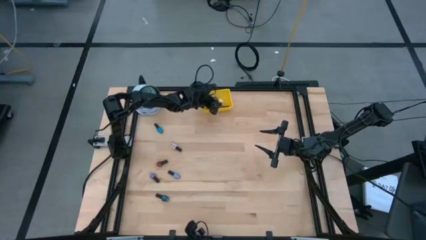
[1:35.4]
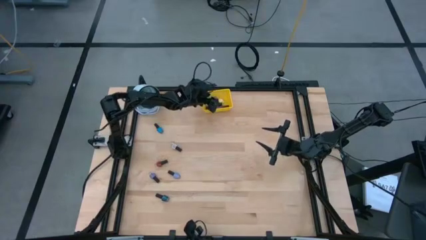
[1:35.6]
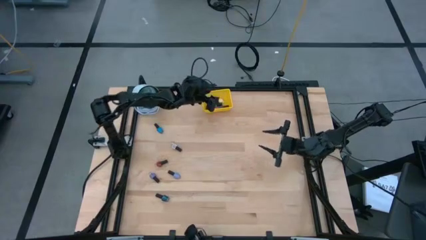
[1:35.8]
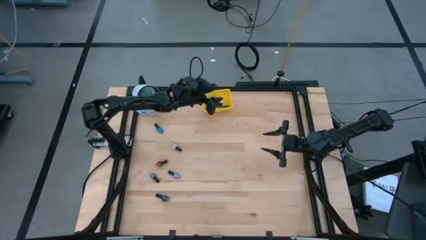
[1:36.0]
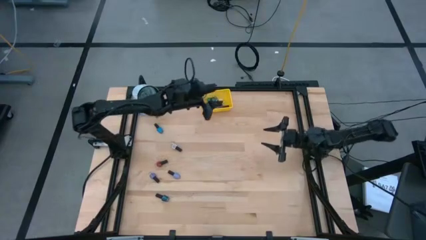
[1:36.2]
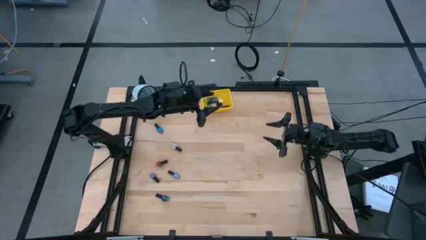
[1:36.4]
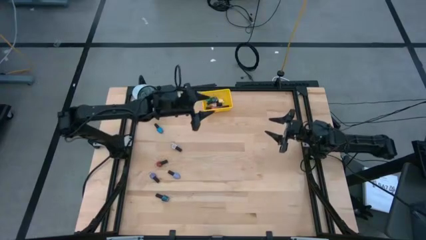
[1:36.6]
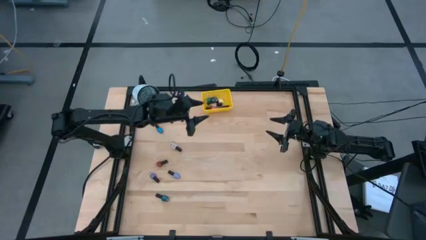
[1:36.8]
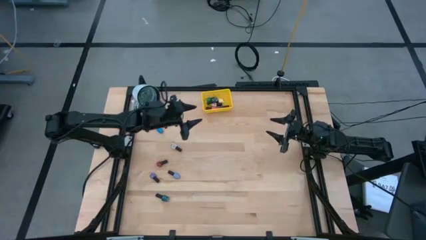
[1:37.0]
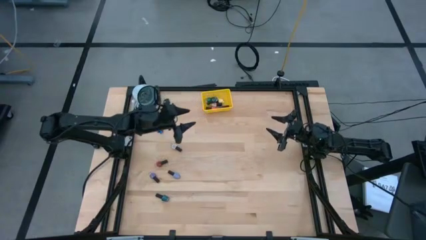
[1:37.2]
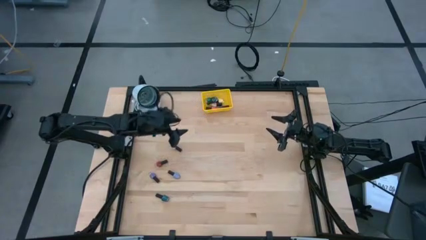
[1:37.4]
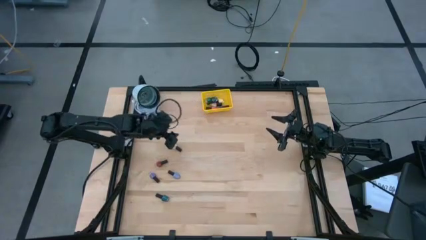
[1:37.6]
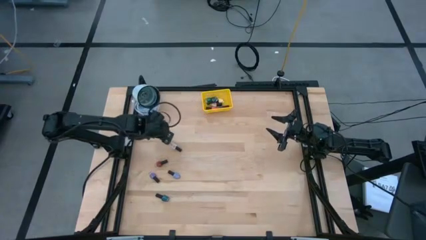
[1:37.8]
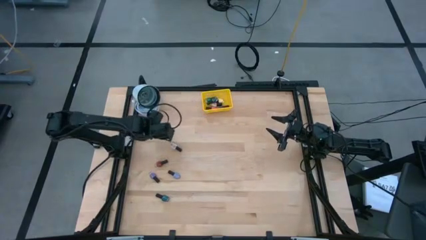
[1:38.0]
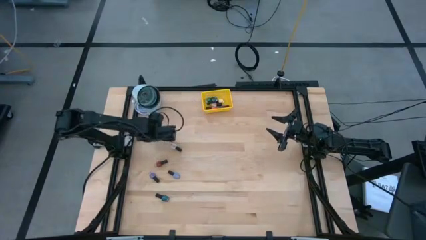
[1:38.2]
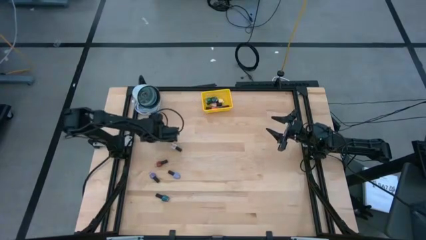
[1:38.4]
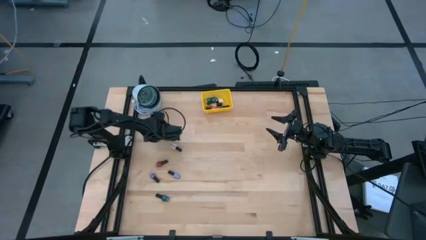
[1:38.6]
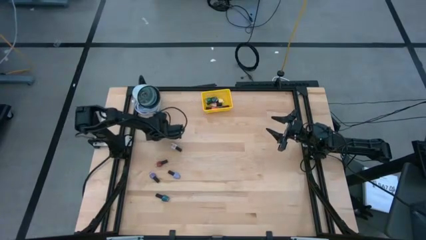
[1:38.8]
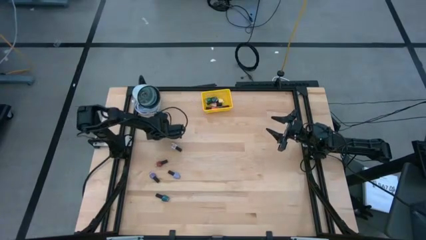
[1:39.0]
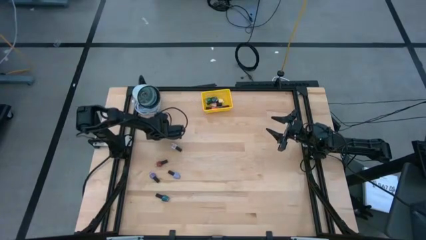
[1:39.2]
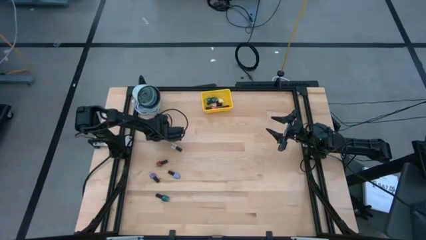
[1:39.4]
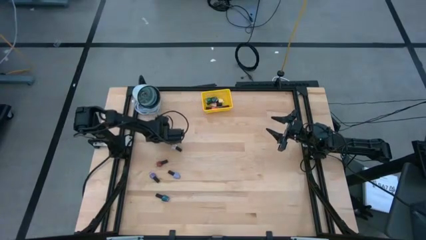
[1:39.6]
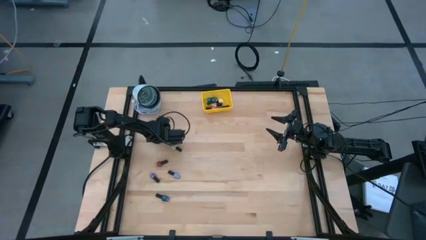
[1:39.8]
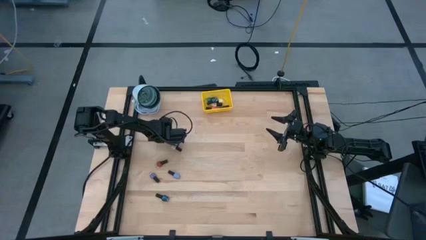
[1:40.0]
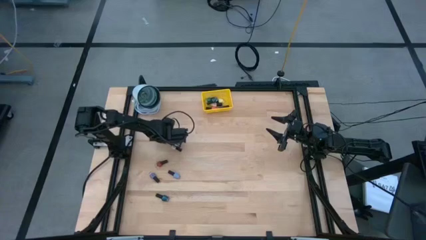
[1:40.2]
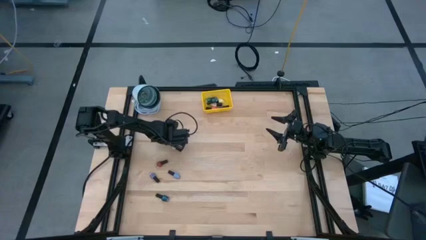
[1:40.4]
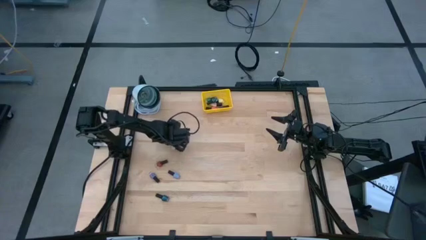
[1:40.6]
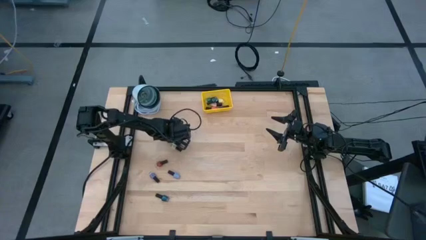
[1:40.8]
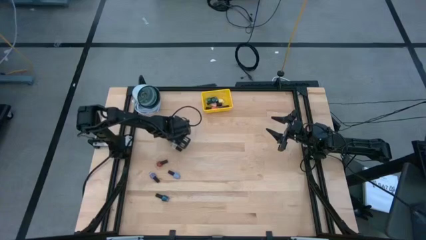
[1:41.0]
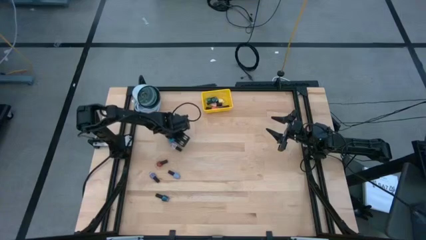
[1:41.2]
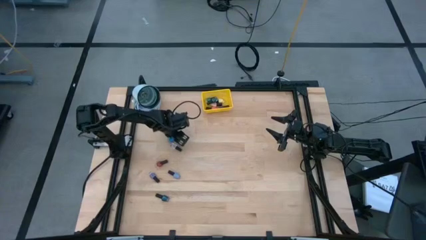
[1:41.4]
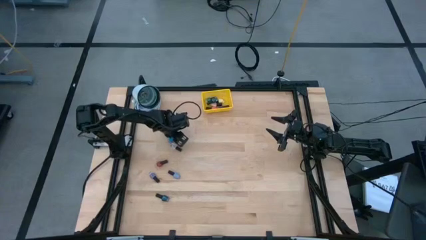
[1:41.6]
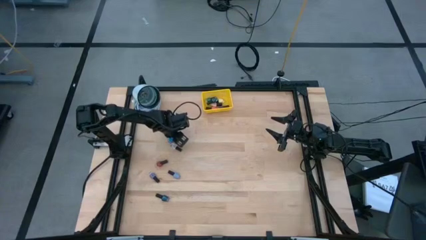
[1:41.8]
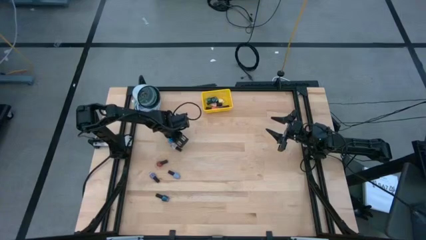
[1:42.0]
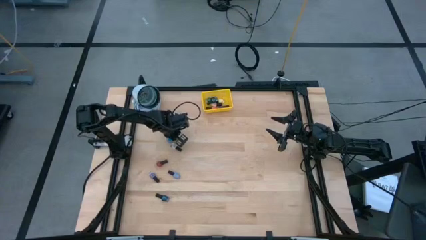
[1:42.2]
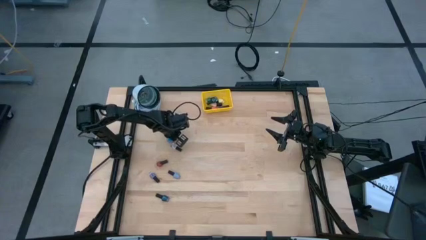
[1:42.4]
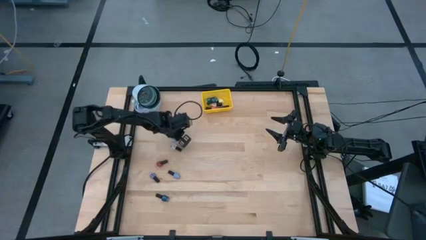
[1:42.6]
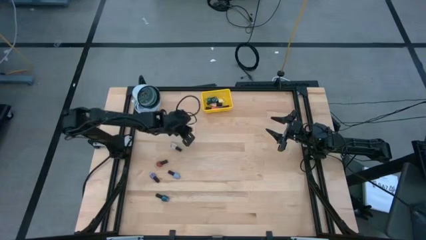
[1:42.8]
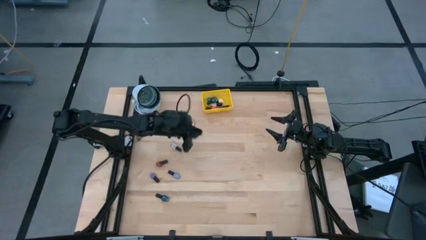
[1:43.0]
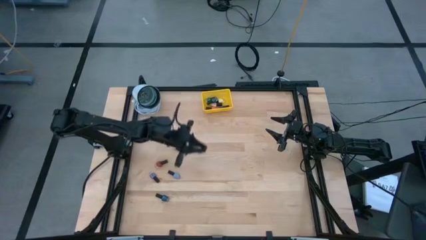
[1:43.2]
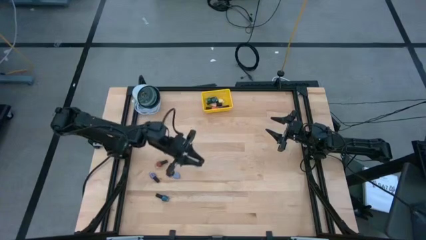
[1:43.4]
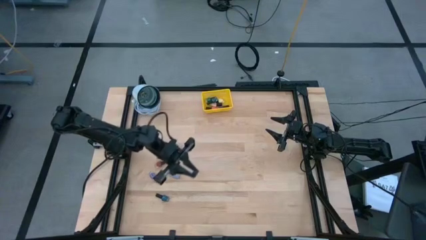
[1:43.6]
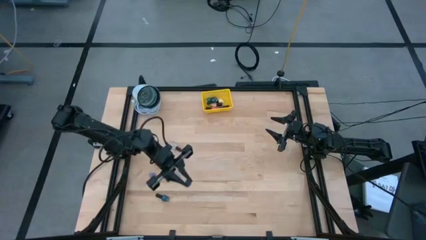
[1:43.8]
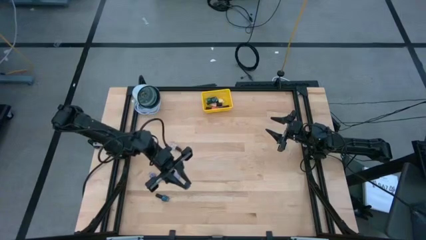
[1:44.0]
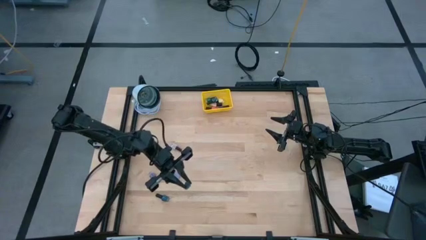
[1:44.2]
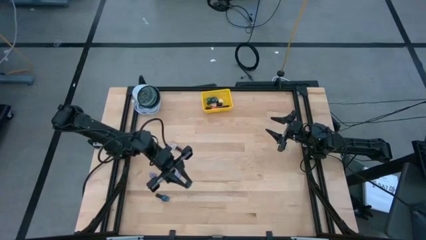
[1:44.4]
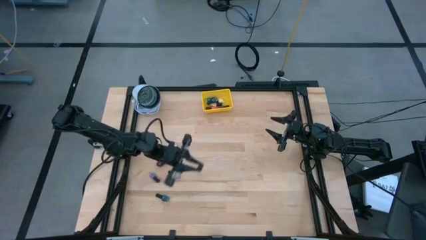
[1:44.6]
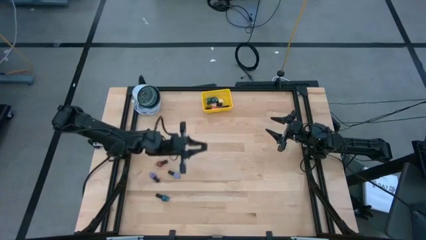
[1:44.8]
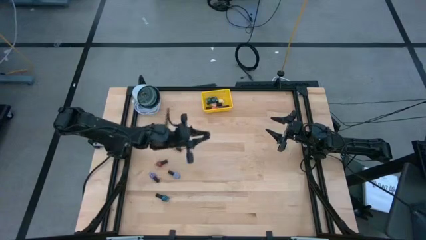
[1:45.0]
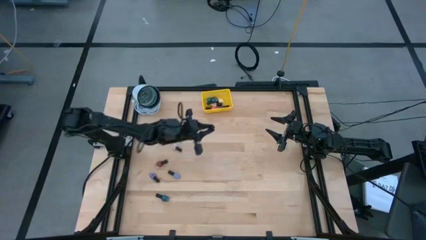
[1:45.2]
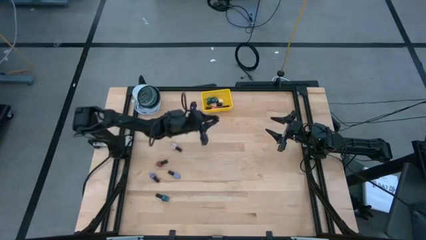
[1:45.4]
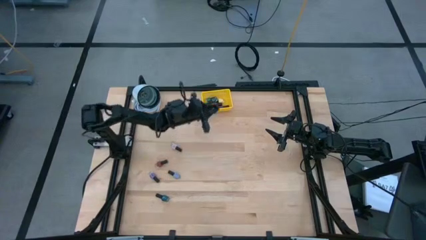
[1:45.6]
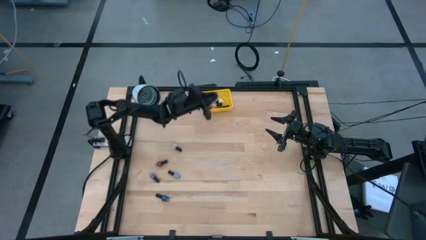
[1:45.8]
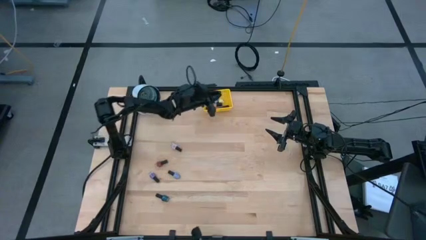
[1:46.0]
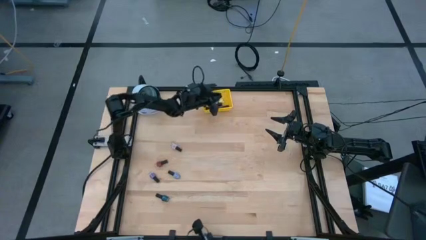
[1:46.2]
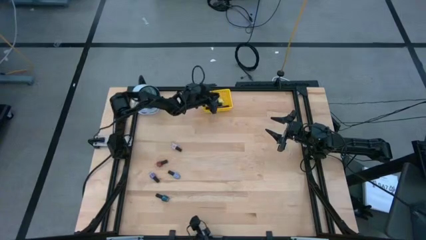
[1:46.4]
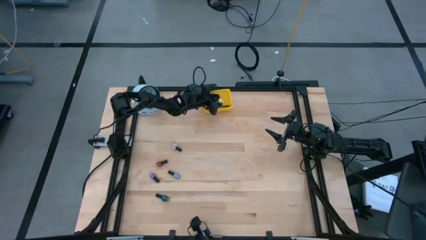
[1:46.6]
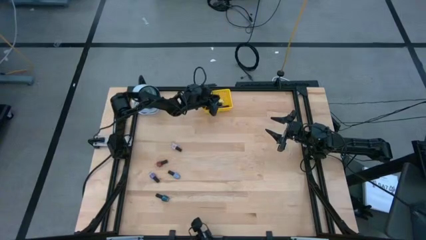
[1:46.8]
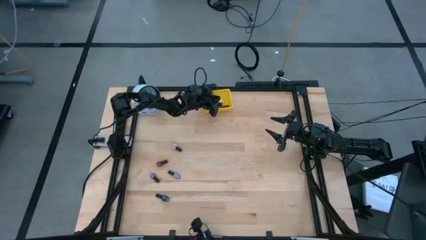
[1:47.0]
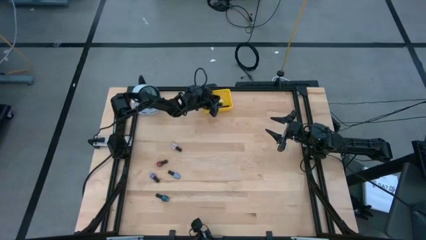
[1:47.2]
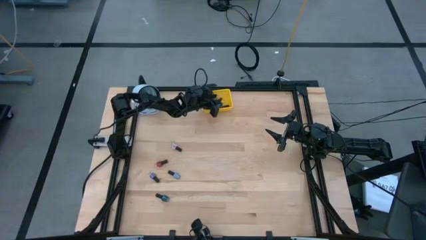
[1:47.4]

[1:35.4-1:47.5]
Task: Pick & Place Nail Polish
Put the blue nail polish bottle into the yellow bin

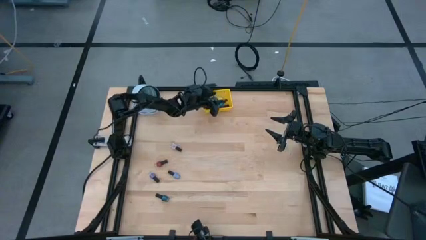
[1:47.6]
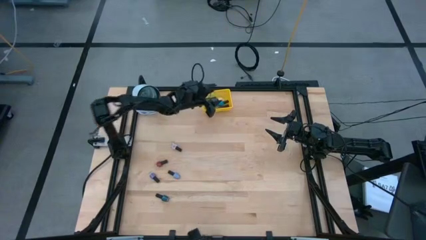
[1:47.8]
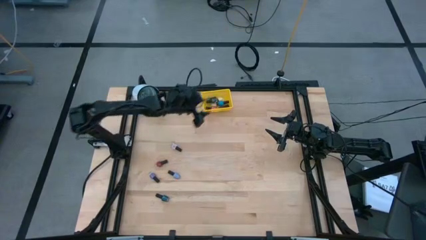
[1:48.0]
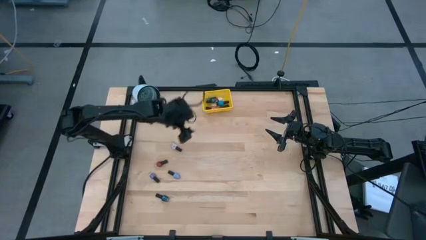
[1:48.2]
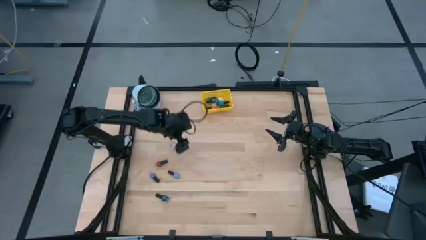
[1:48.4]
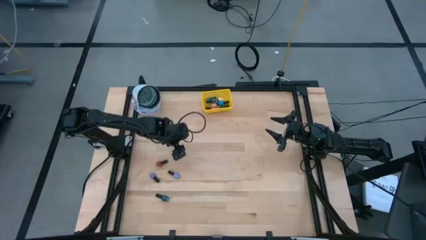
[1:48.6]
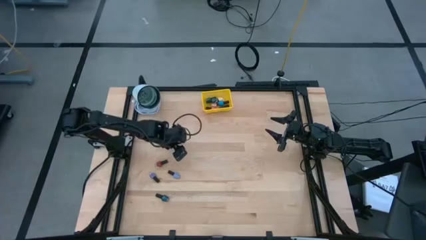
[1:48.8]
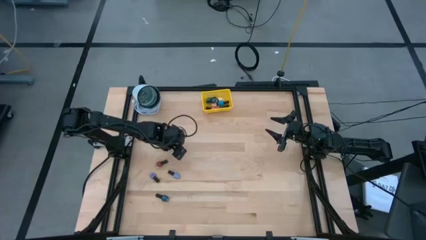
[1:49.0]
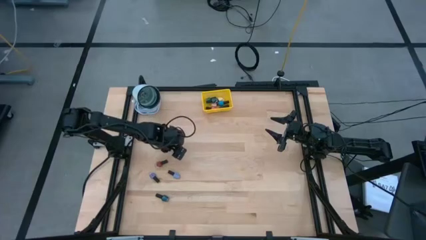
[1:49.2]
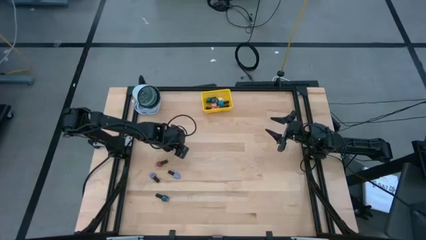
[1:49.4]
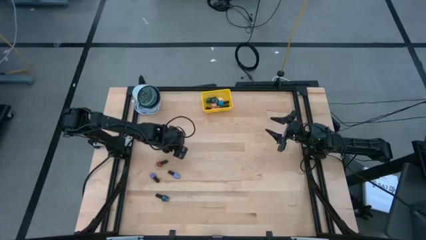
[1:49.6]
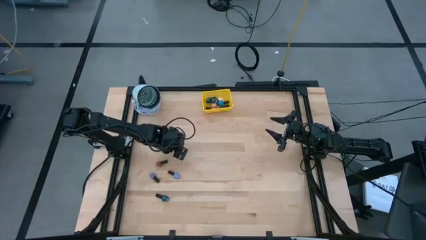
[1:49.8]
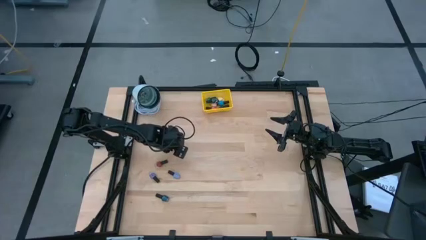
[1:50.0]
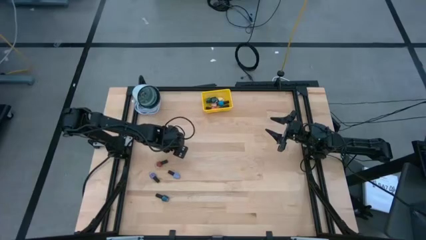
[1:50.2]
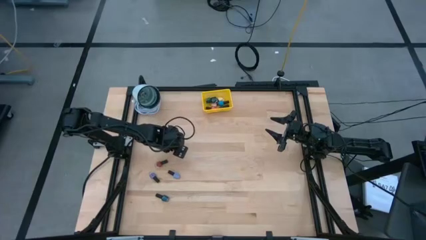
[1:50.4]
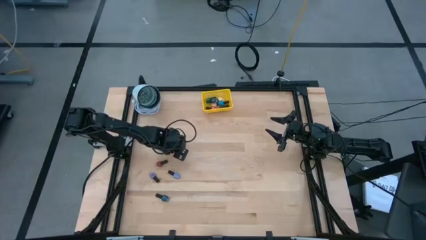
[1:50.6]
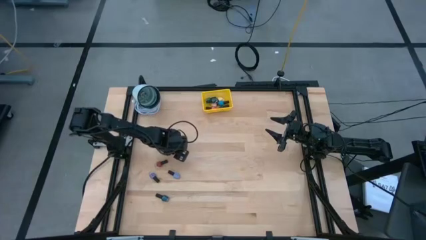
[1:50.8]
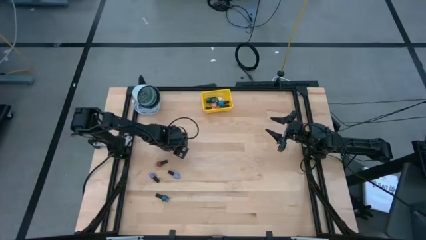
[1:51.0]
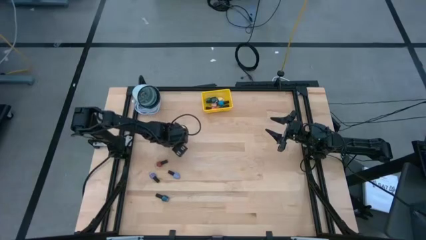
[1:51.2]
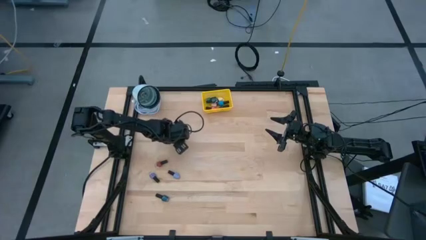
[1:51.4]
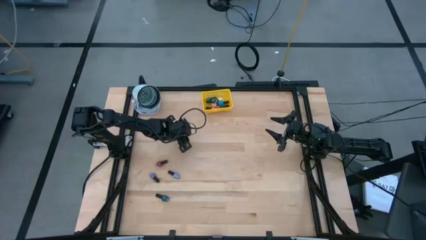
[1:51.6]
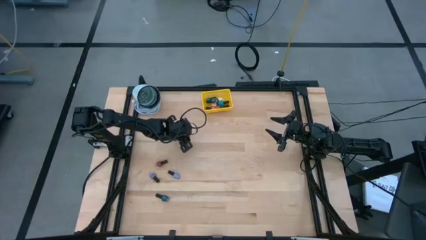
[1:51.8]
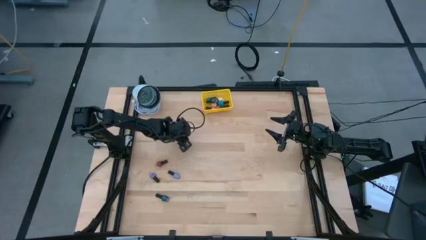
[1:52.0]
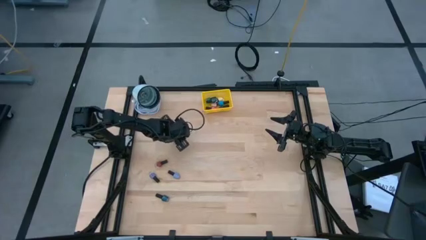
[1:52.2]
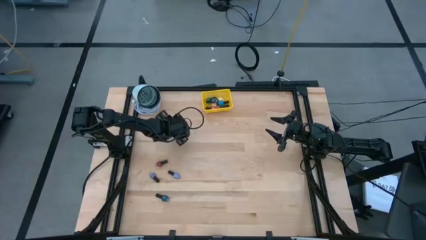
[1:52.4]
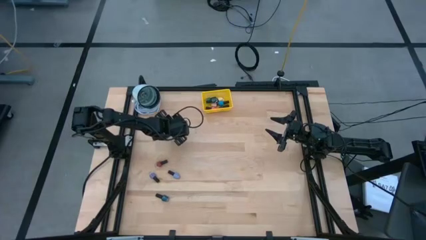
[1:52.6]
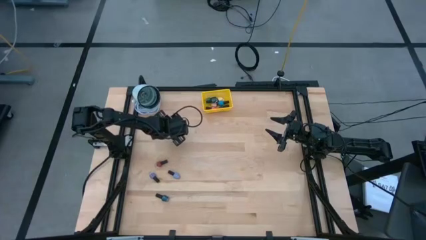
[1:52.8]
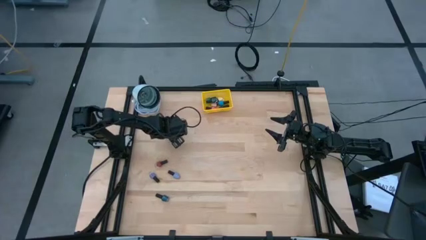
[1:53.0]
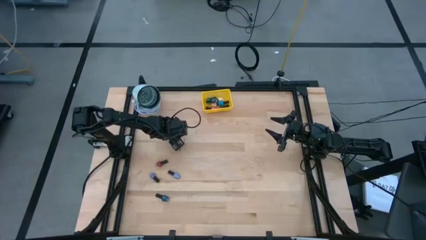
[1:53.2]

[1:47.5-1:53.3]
Put the white nail polish bottle into the yellow bin
